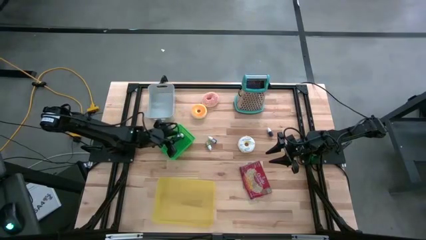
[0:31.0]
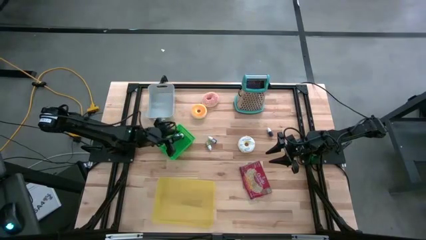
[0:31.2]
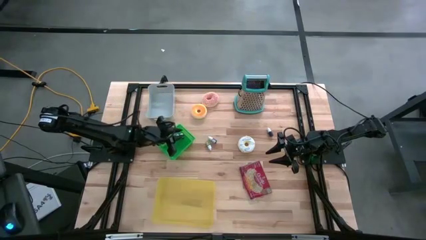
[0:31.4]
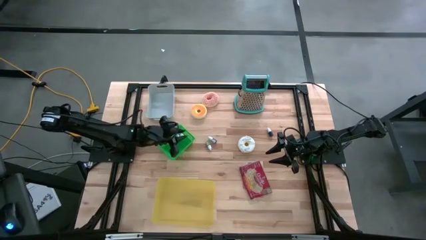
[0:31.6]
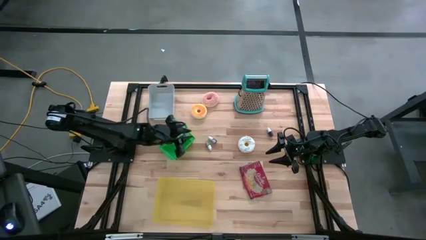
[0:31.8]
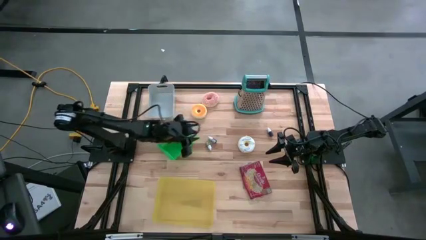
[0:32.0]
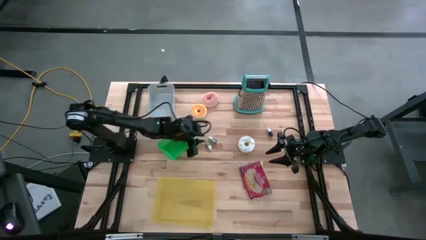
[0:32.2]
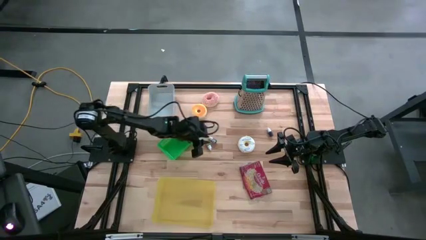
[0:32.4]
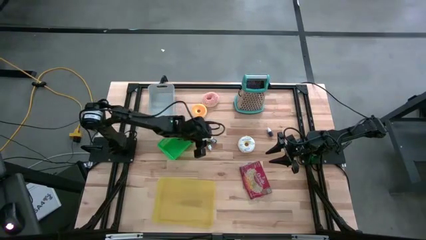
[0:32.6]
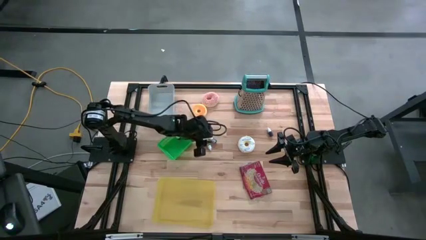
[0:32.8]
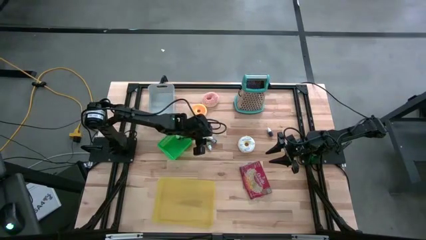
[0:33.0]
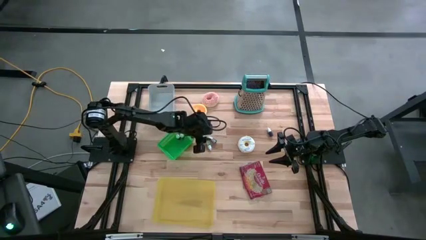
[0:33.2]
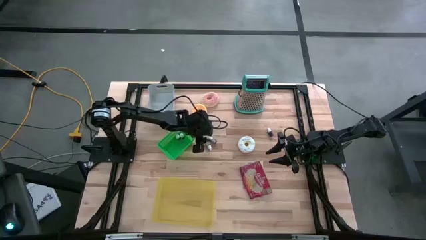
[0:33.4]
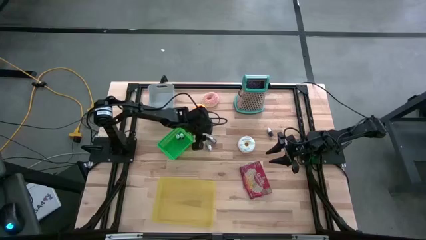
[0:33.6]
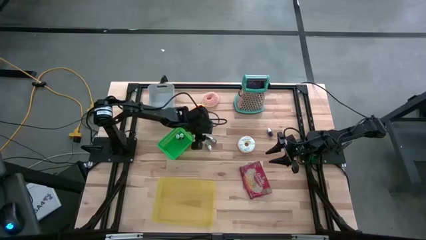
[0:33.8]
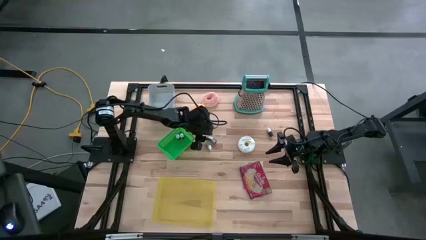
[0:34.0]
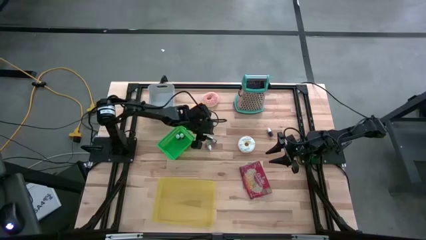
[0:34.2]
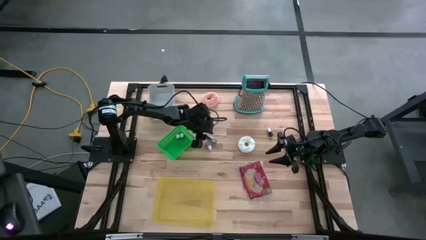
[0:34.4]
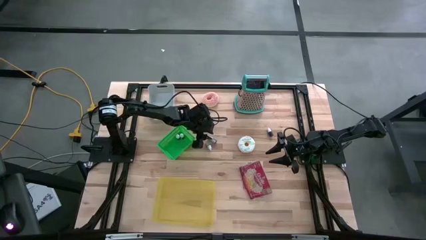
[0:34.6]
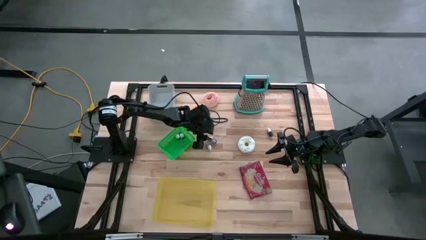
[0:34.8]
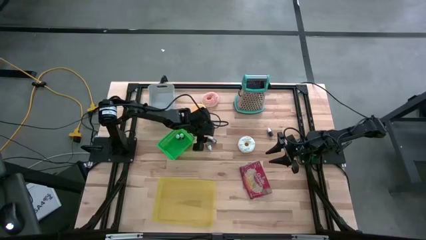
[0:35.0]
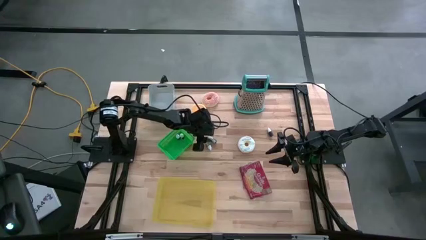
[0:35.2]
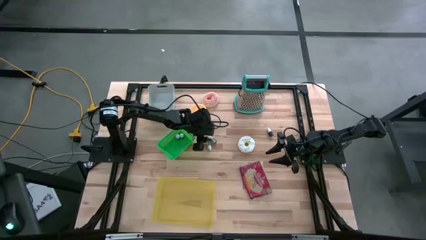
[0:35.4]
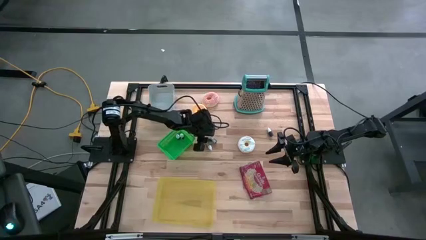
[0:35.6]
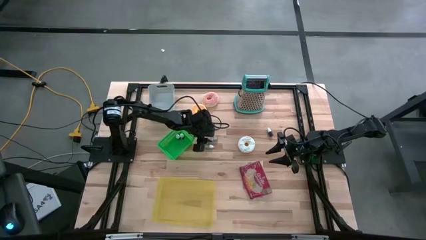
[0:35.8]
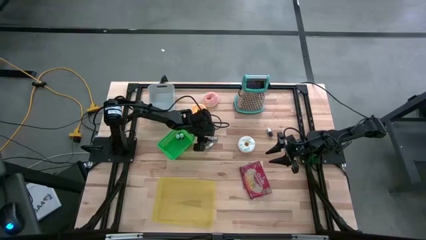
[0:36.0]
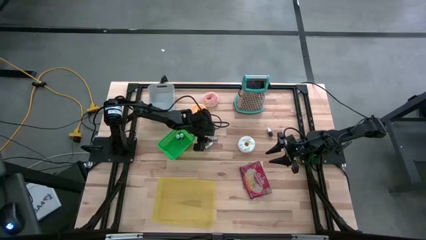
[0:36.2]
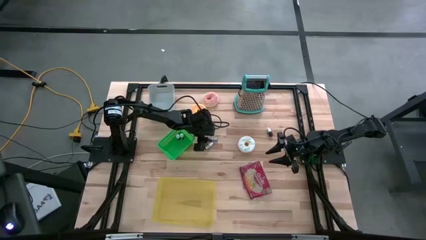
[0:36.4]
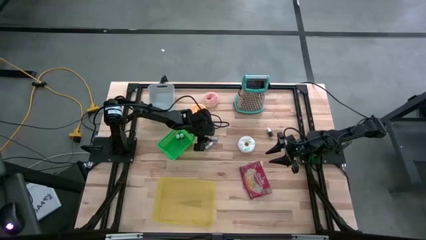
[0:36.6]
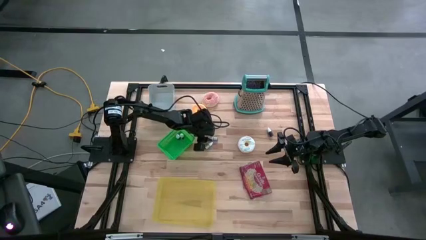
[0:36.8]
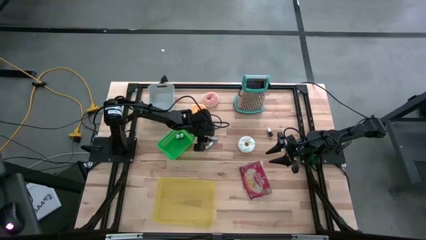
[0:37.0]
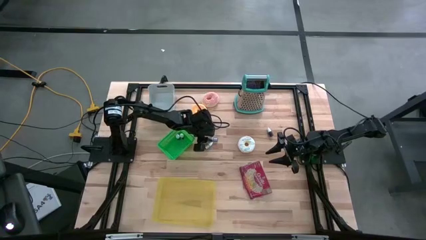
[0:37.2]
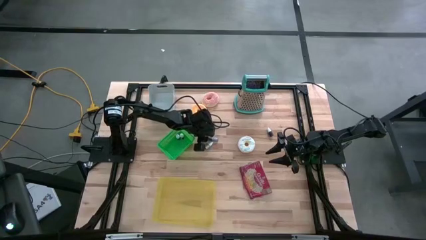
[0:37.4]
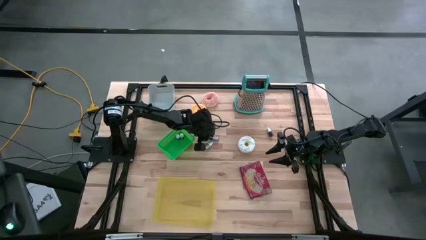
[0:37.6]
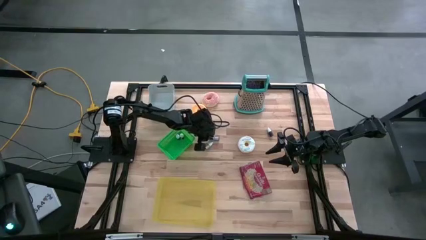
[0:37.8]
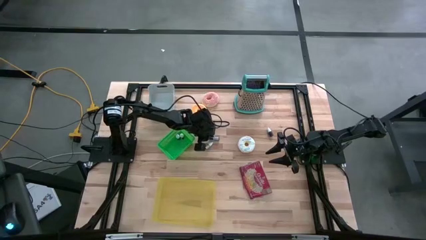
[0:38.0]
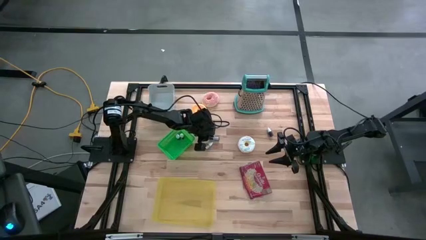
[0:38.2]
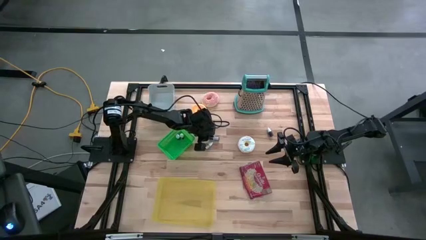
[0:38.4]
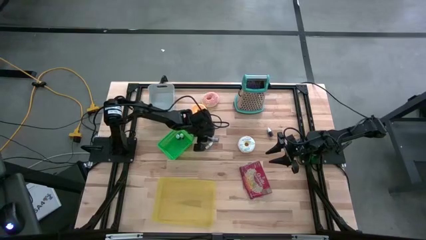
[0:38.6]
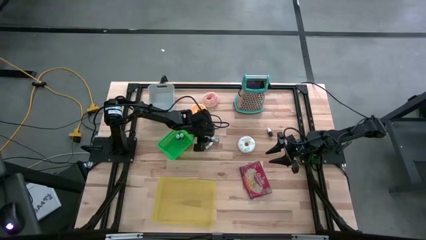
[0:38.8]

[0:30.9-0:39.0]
Put the black bottle into the green basket

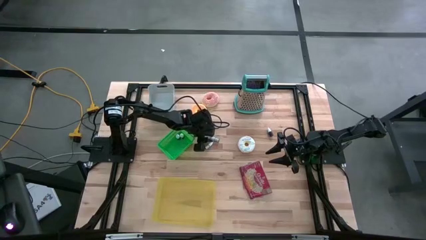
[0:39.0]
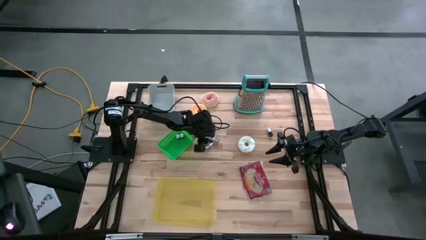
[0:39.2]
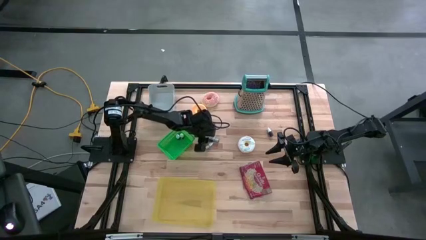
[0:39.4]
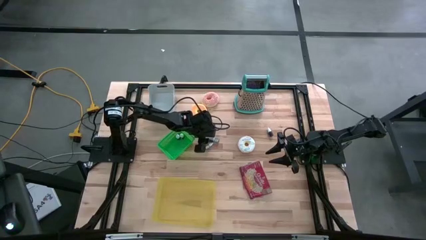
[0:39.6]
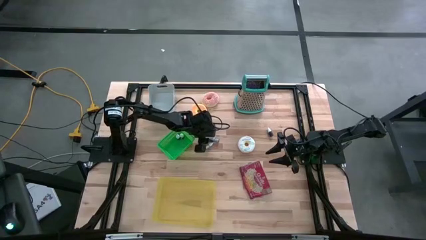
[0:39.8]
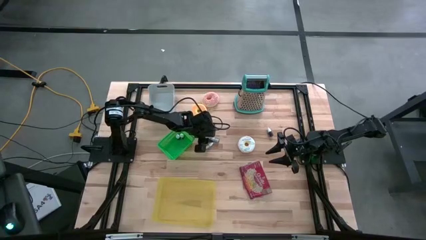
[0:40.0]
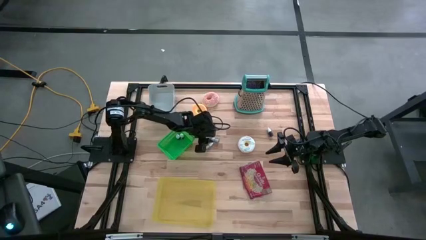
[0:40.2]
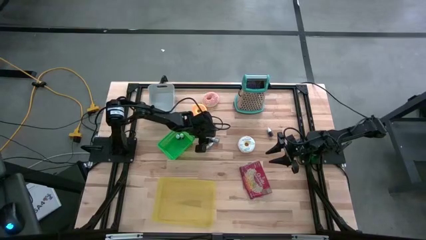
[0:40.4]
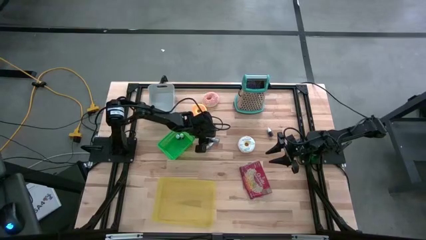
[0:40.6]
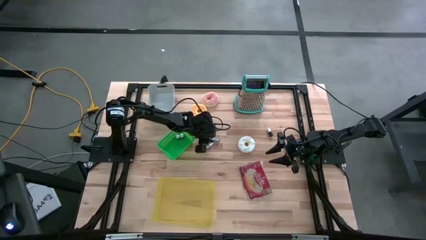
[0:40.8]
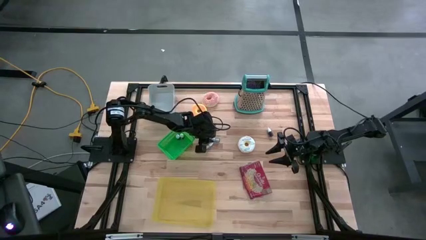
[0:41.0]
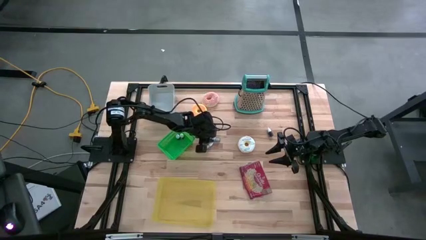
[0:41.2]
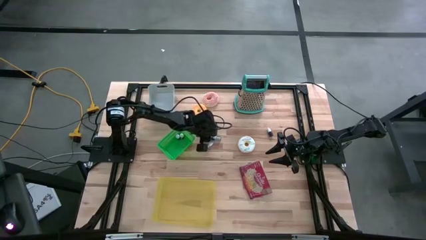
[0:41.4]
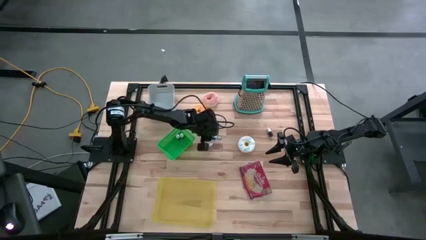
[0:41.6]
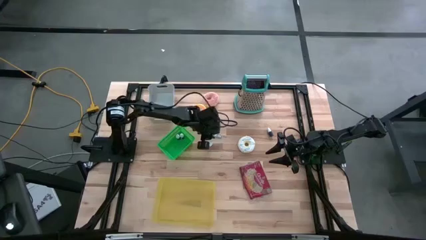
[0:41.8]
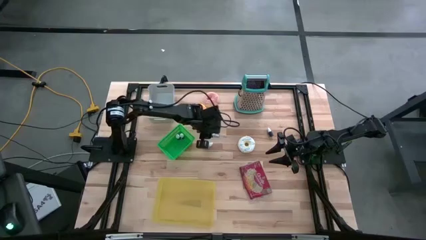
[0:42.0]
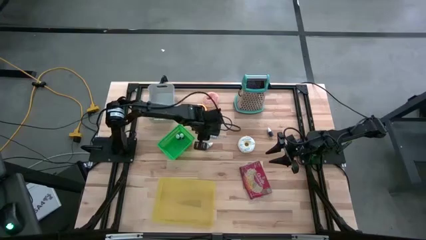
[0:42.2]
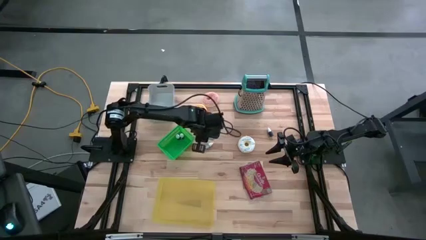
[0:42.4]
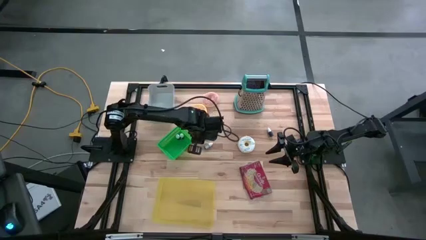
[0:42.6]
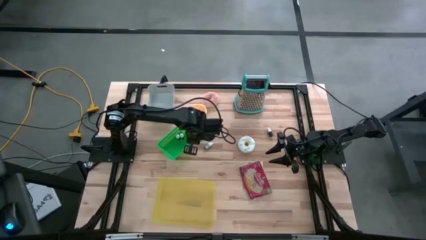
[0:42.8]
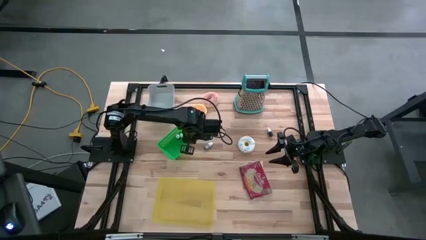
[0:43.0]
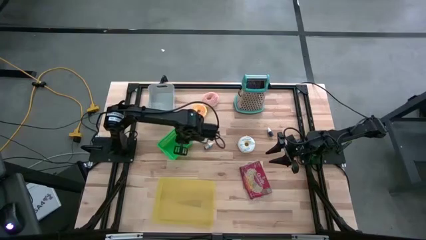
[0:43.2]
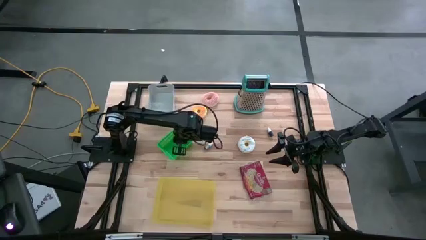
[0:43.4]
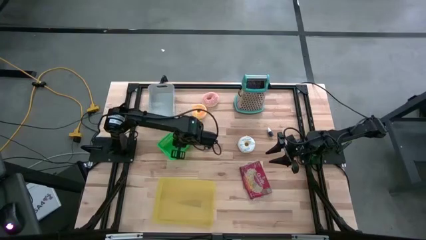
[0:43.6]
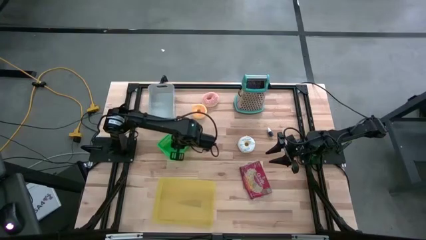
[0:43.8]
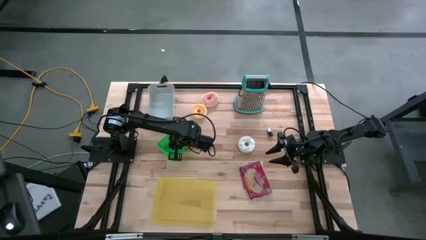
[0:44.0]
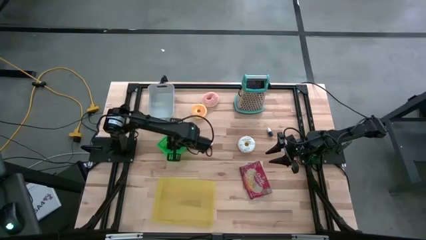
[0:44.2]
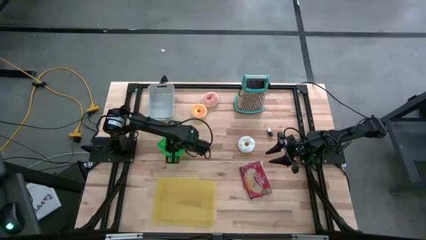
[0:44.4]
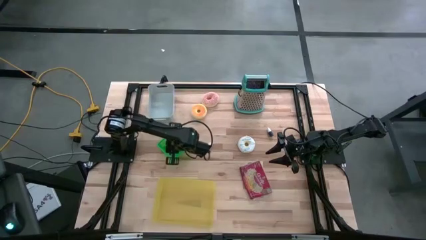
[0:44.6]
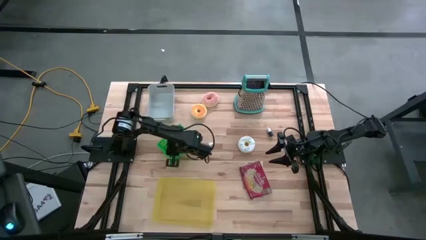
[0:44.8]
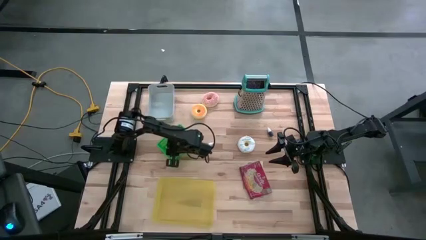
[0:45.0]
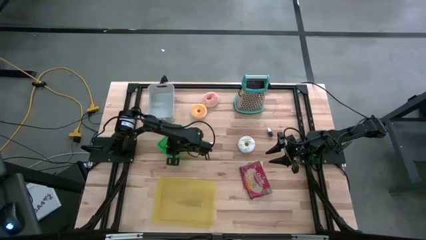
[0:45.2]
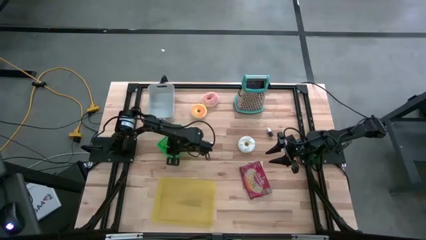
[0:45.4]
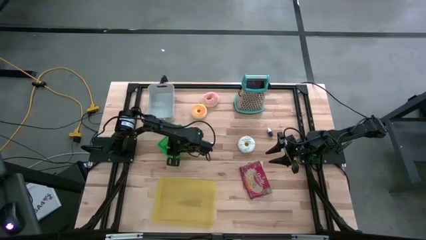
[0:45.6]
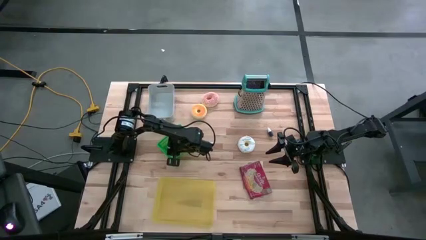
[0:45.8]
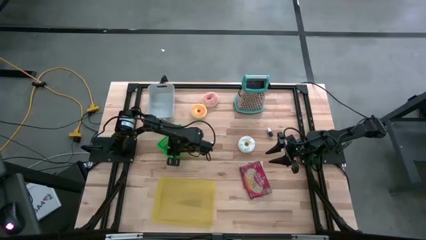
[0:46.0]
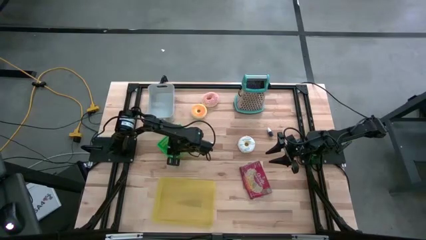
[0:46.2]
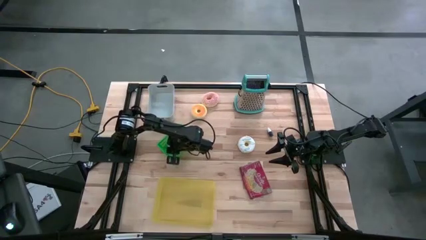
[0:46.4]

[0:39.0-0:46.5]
Put the black bottle into the green basket
